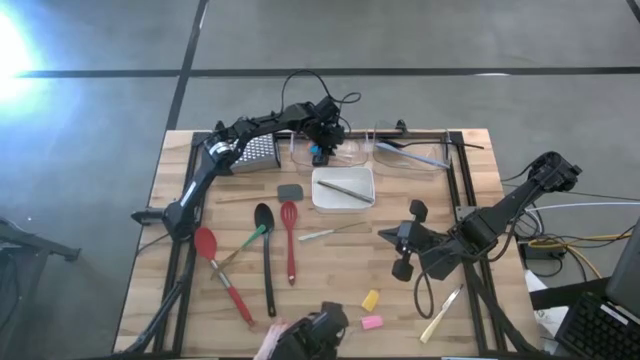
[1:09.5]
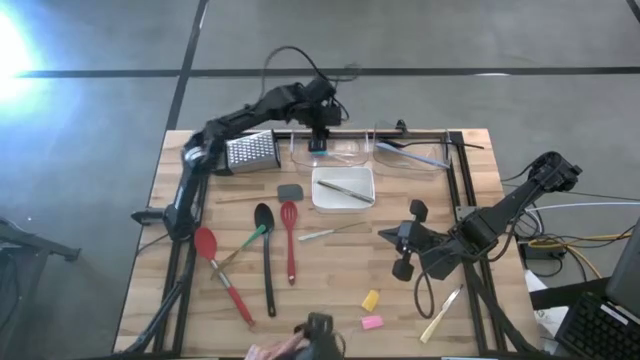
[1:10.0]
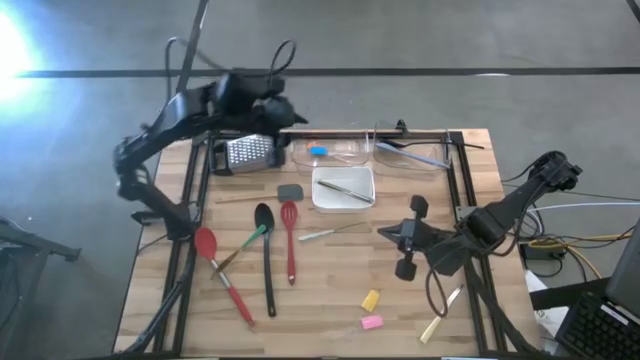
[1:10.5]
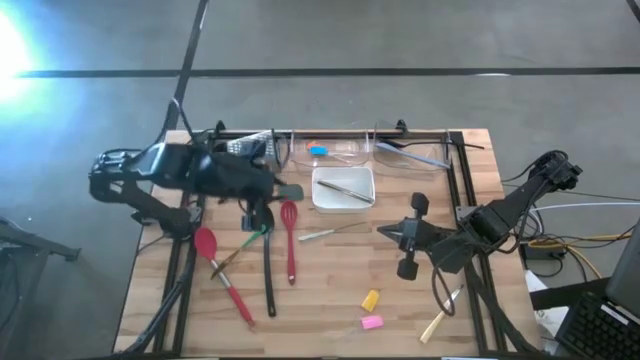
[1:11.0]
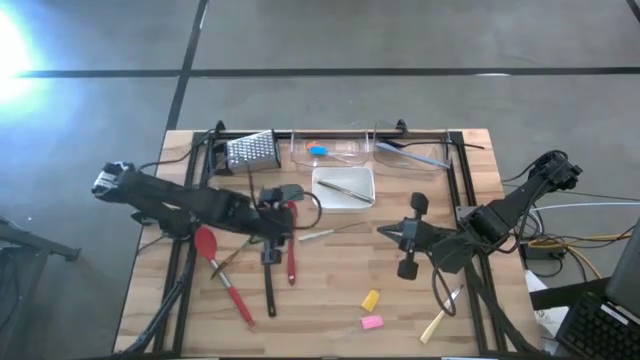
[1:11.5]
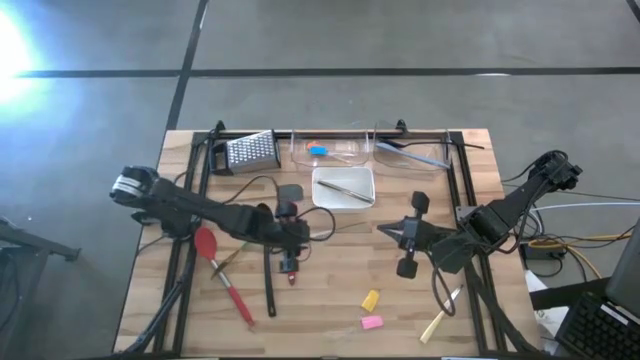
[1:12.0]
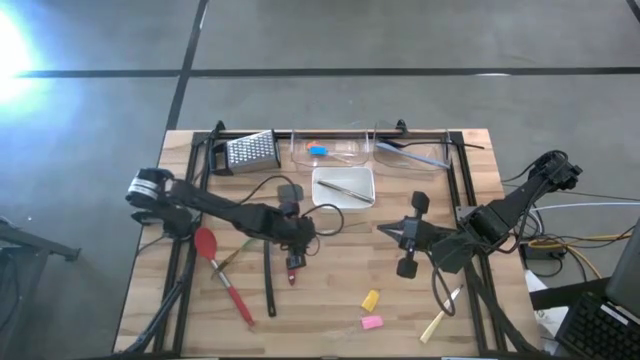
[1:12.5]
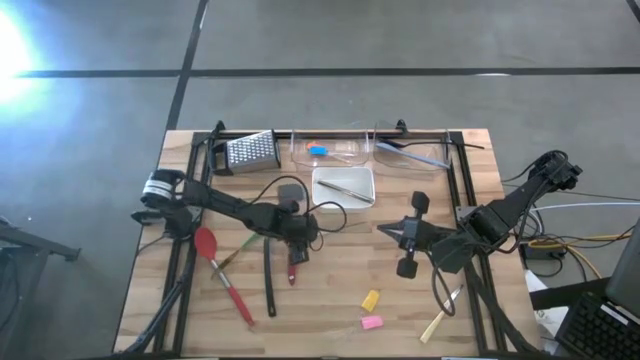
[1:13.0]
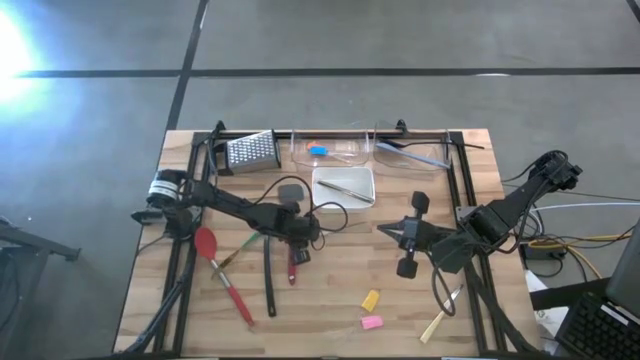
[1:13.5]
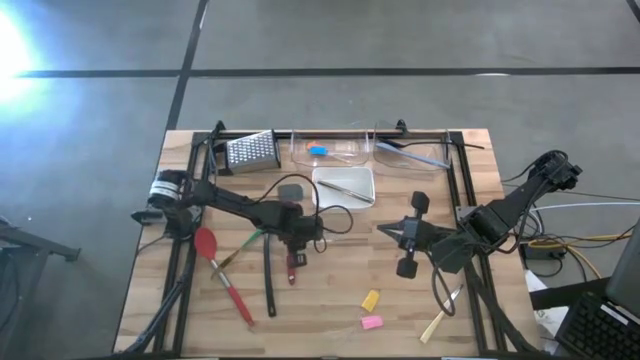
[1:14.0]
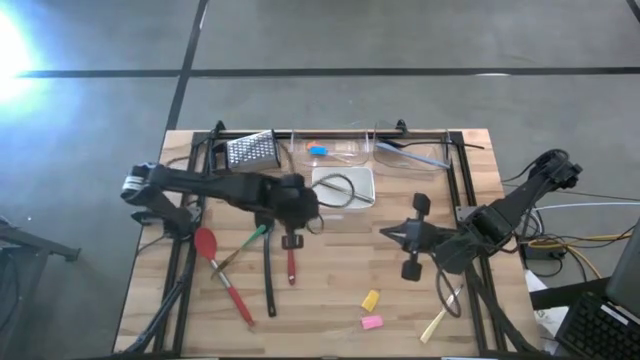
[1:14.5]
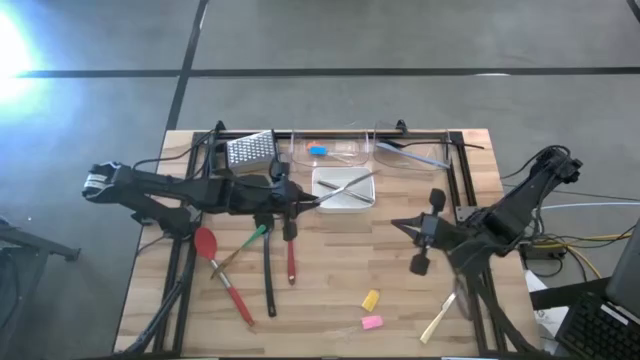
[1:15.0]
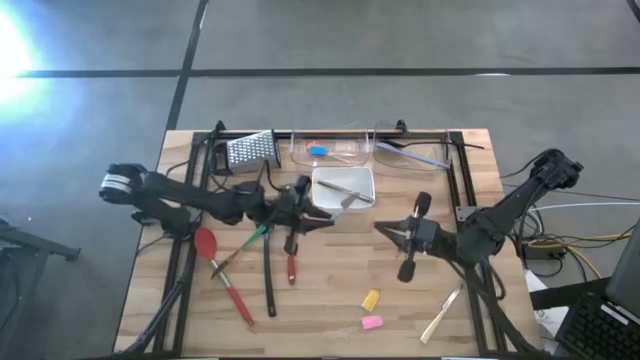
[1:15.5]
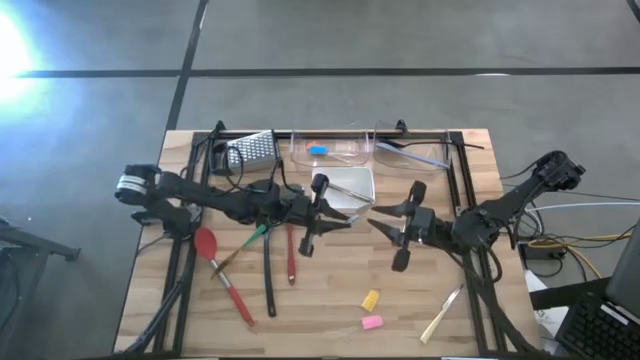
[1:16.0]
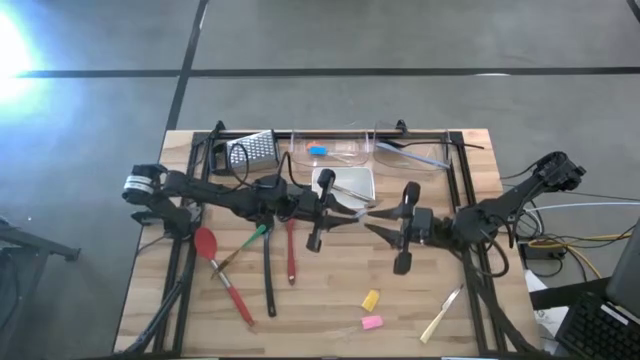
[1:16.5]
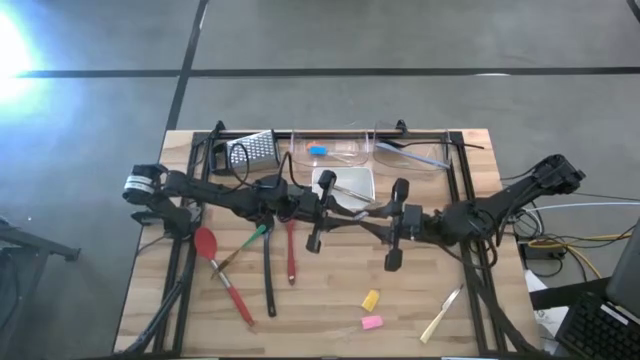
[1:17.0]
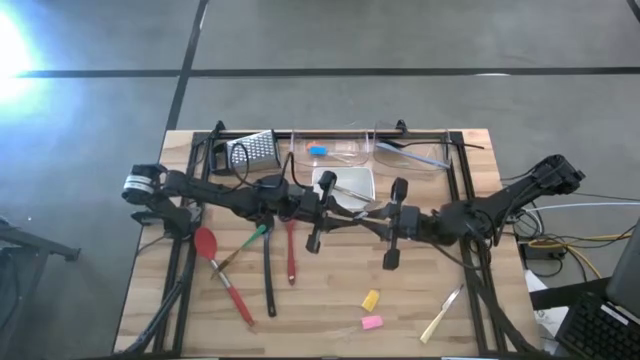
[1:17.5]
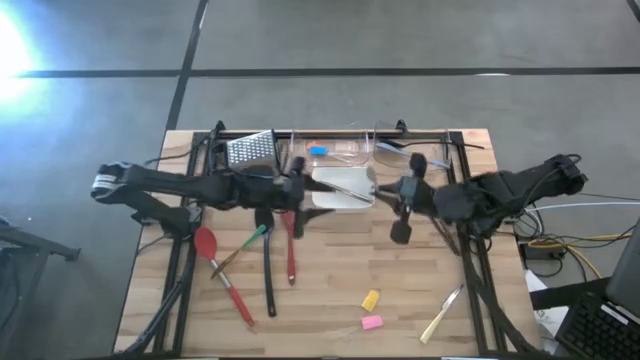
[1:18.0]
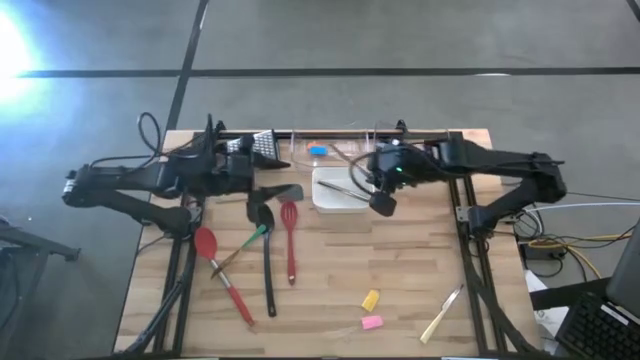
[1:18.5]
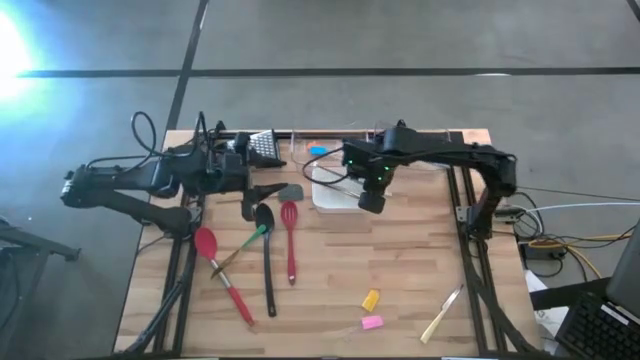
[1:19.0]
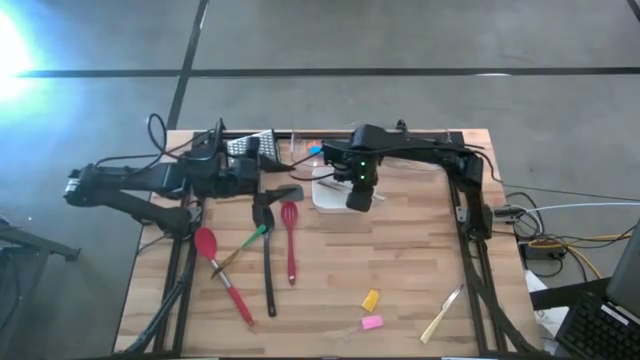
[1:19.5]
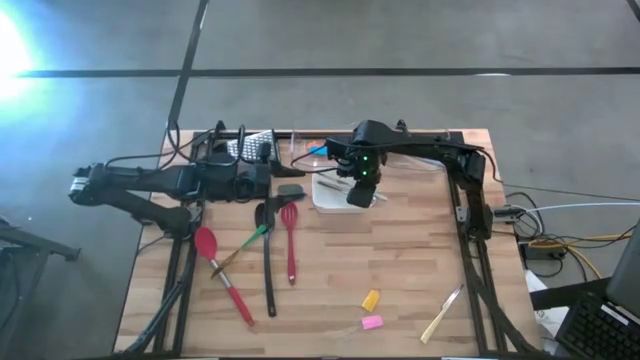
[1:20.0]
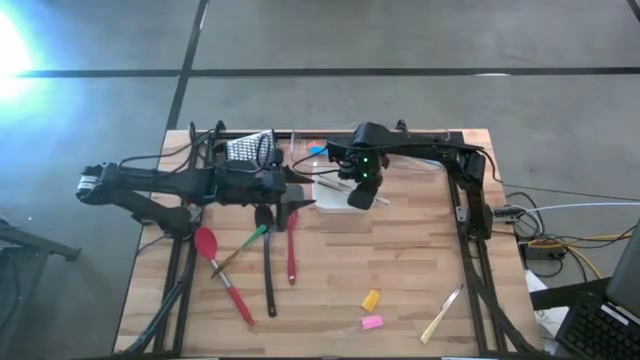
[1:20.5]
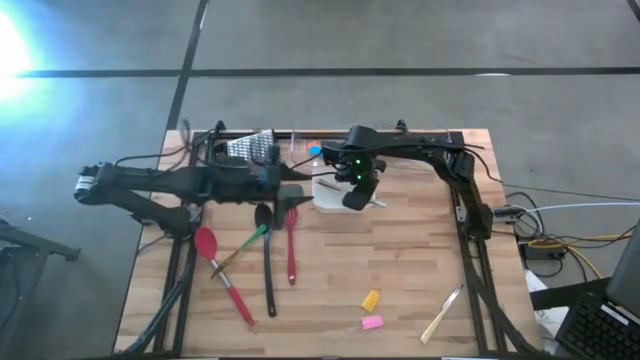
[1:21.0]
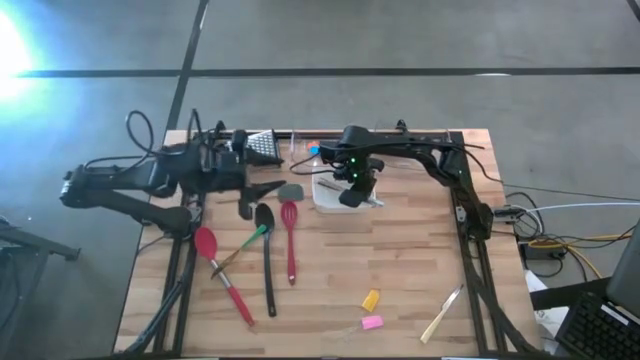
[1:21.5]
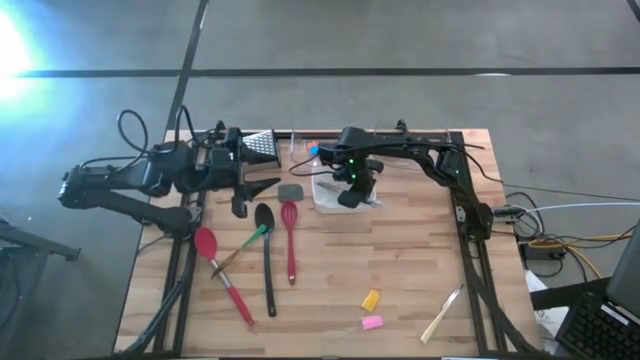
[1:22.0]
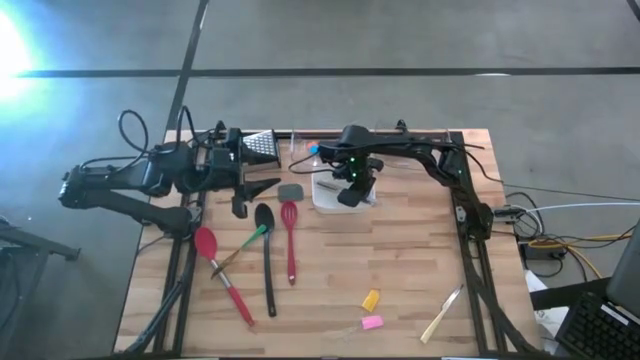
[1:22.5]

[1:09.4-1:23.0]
Task: Pick & Place Kitchen Items
Put the white table knife into the white bin

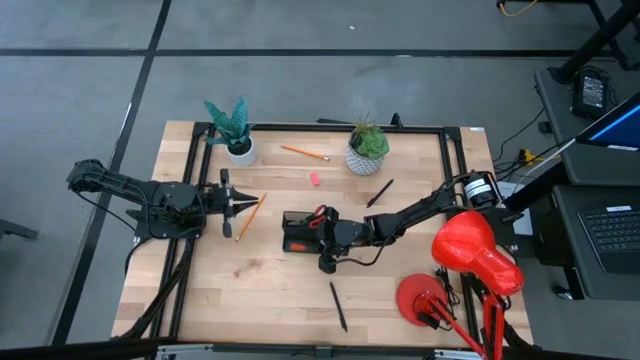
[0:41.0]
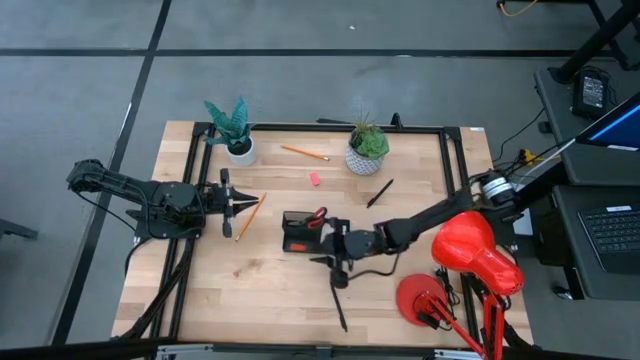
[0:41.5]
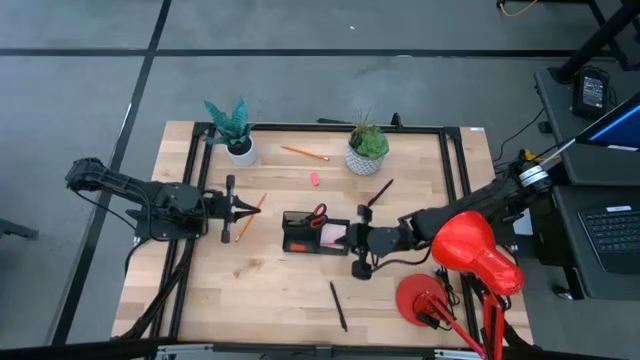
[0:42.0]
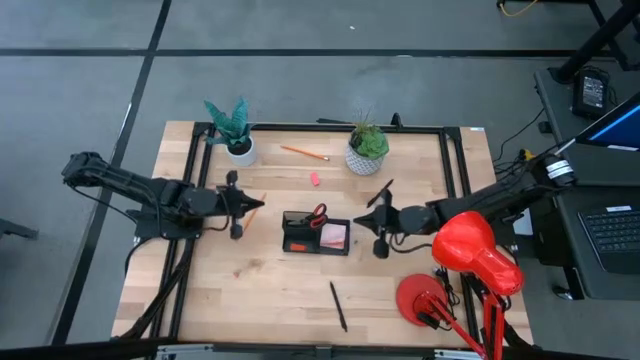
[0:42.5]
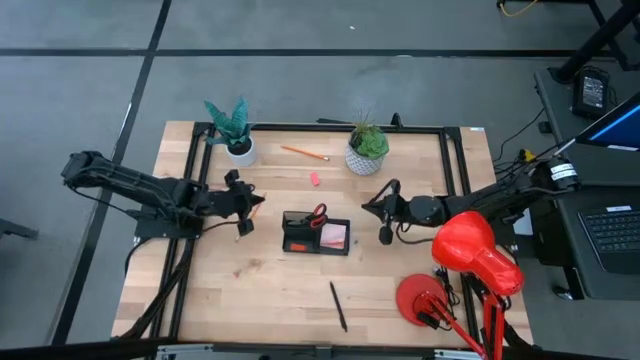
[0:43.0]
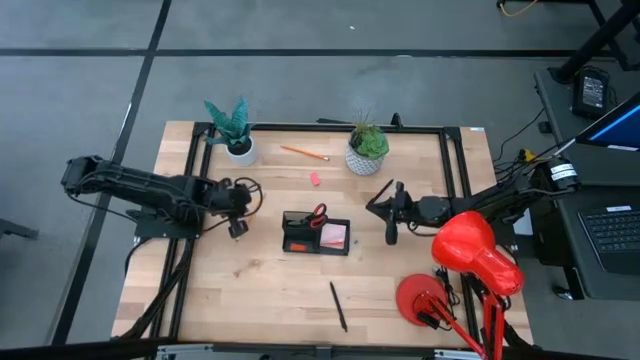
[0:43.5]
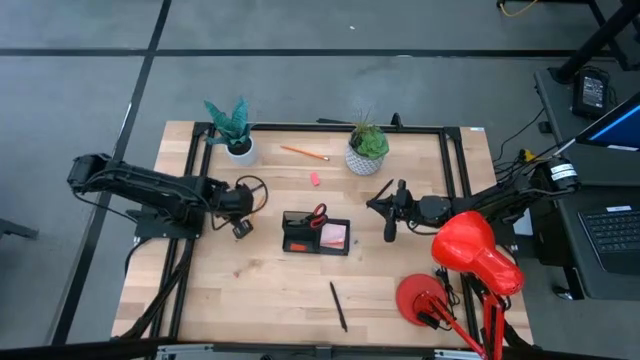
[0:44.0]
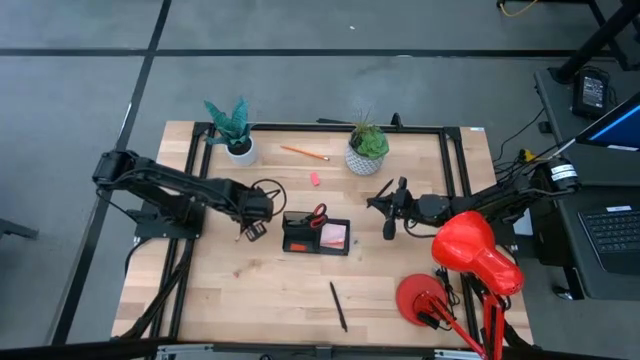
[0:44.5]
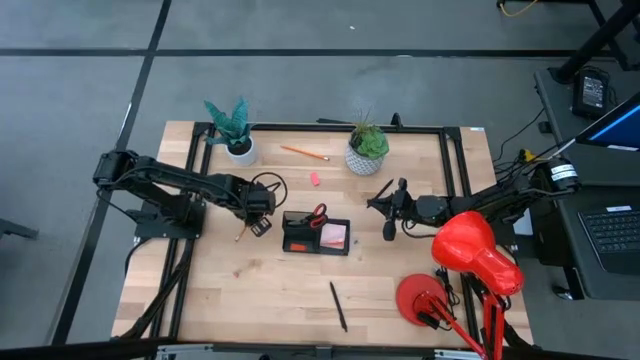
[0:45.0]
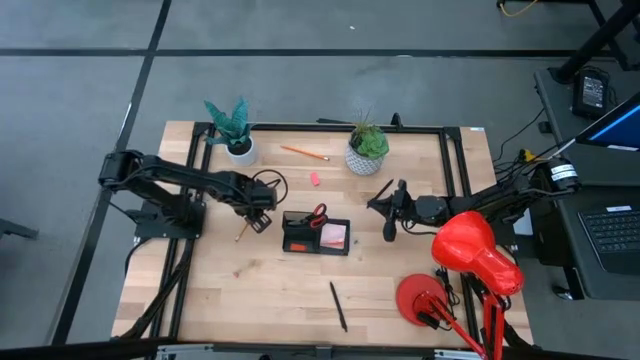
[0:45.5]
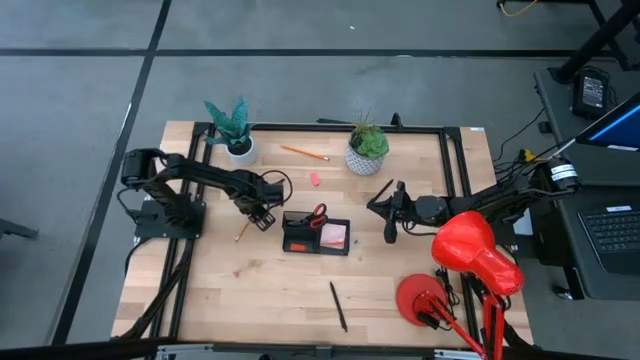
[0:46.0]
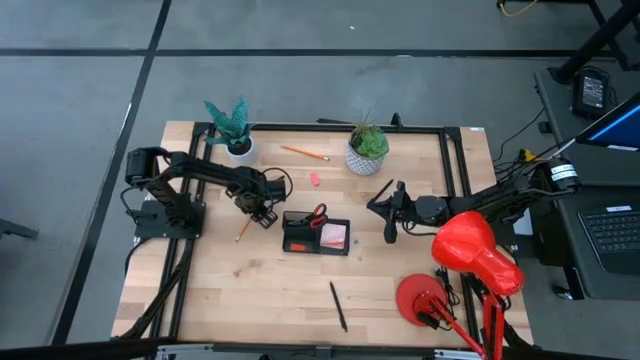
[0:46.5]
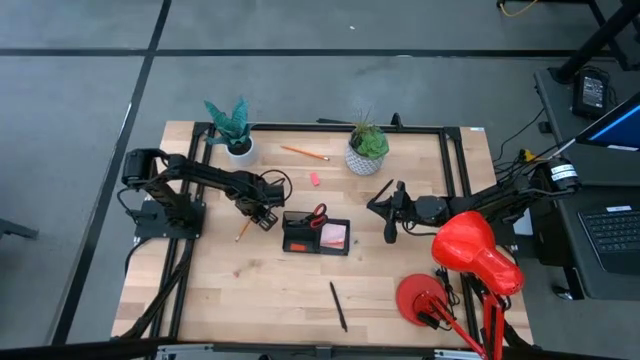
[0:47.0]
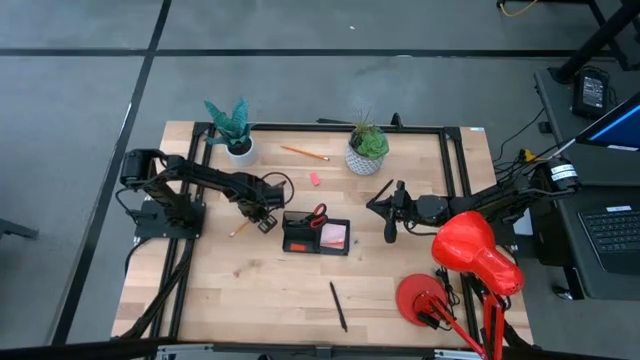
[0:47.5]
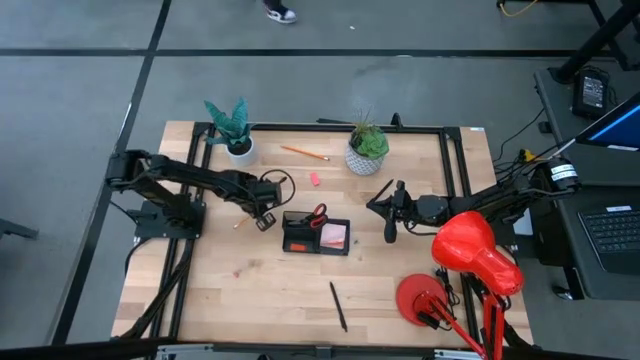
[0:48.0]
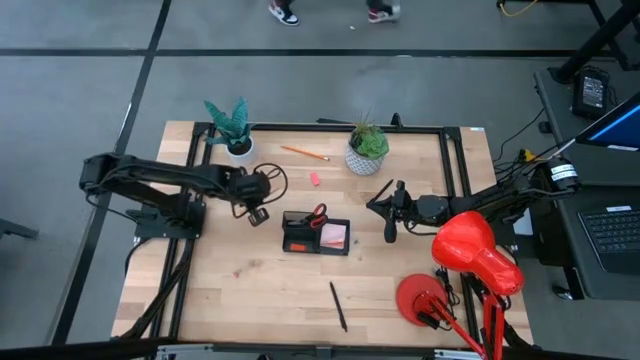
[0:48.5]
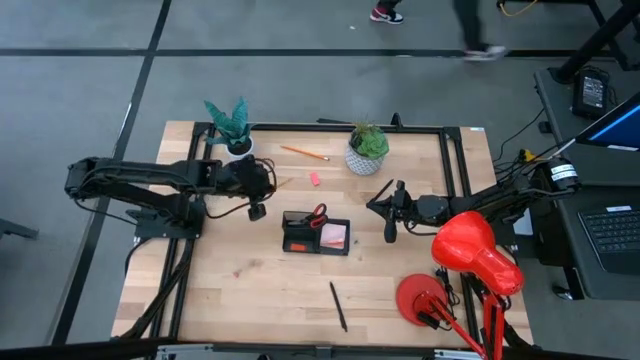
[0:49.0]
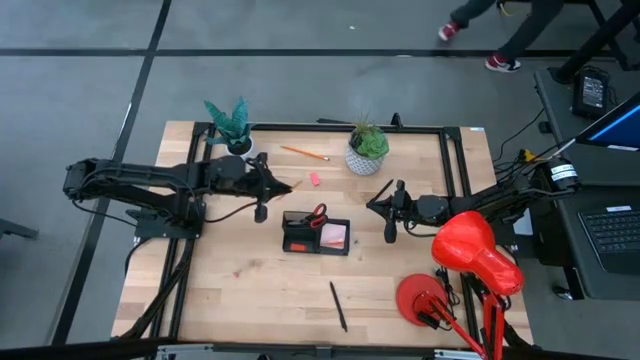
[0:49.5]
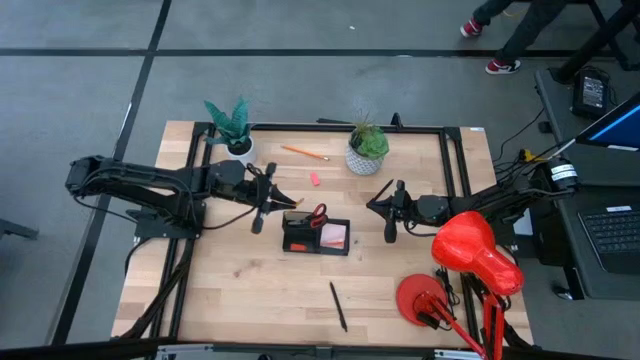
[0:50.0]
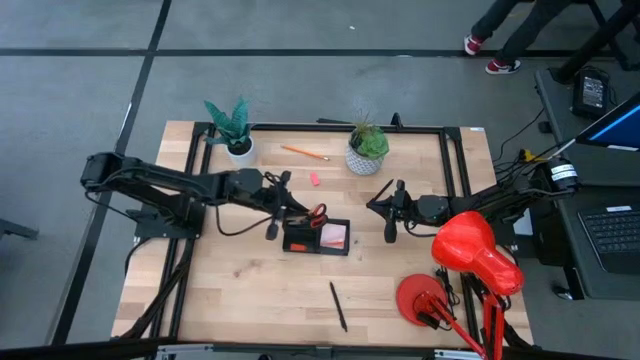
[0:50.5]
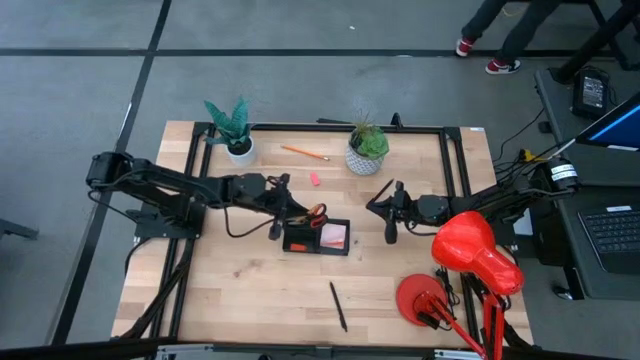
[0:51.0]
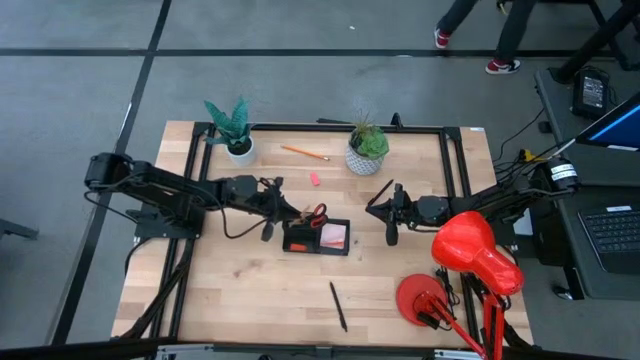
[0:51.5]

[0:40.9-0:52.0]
Task: Pick and place office supplies into organizer
Put the bottom orange pencil into the desk organizer
